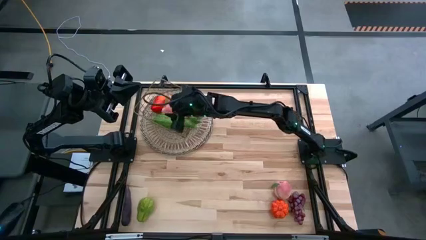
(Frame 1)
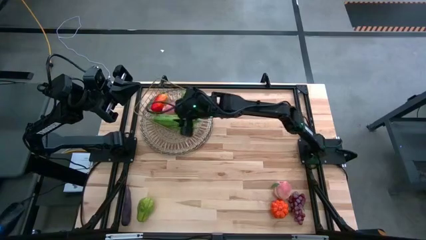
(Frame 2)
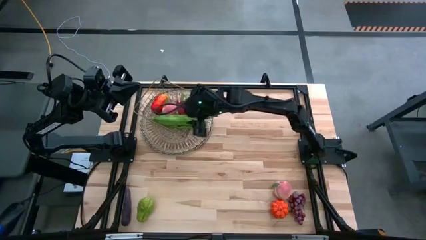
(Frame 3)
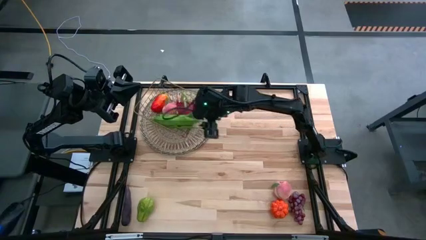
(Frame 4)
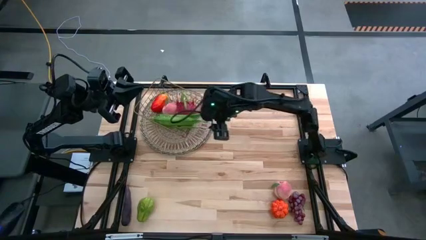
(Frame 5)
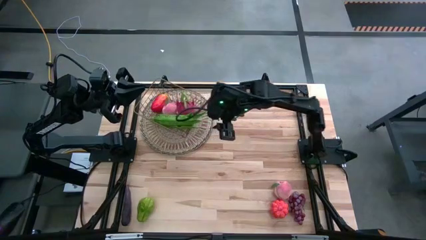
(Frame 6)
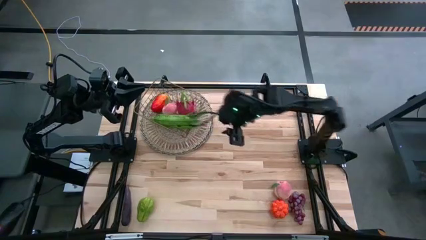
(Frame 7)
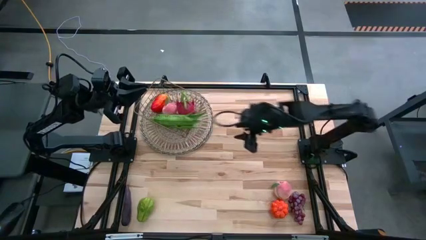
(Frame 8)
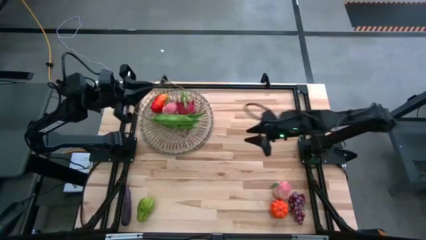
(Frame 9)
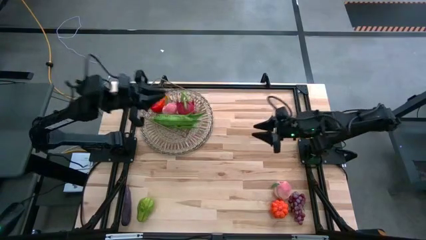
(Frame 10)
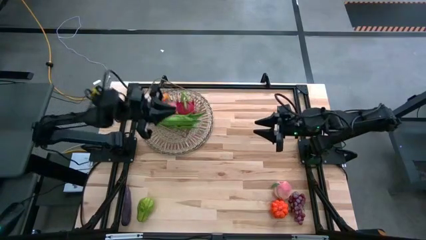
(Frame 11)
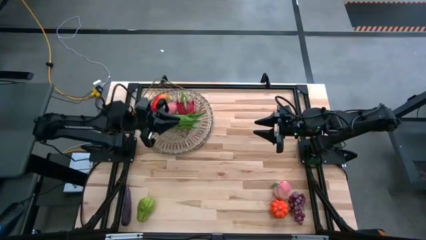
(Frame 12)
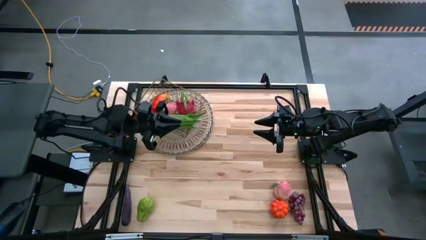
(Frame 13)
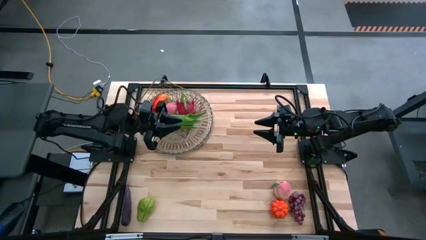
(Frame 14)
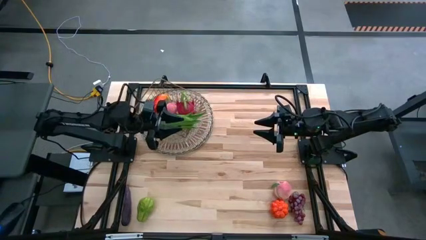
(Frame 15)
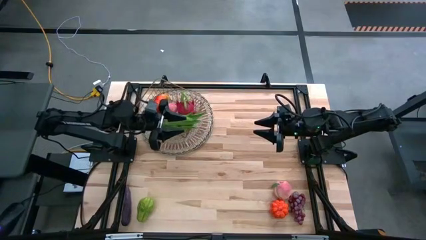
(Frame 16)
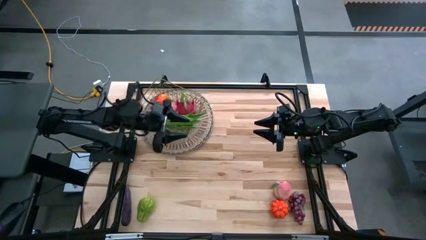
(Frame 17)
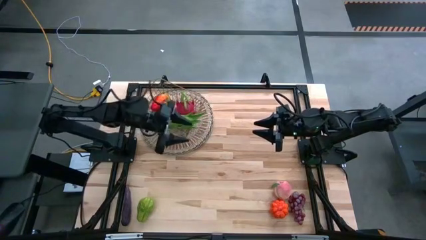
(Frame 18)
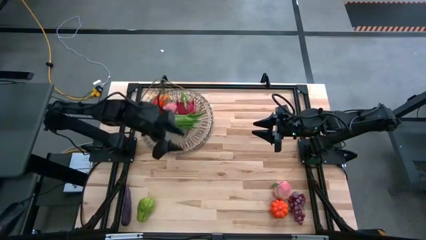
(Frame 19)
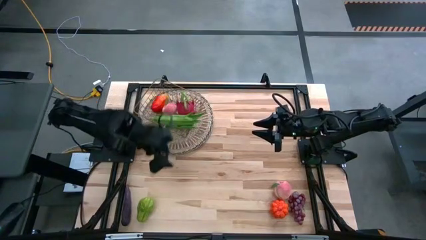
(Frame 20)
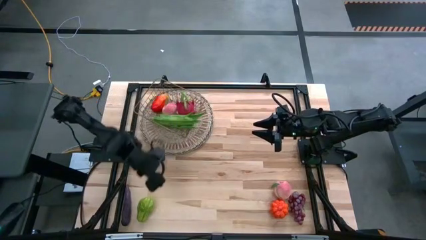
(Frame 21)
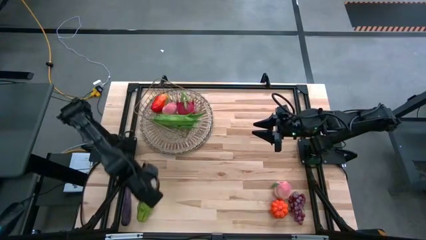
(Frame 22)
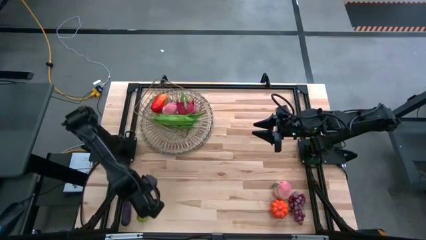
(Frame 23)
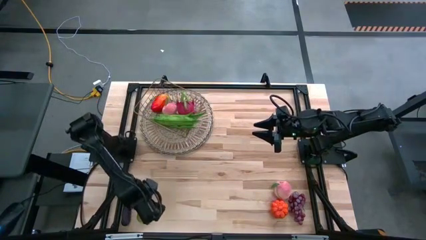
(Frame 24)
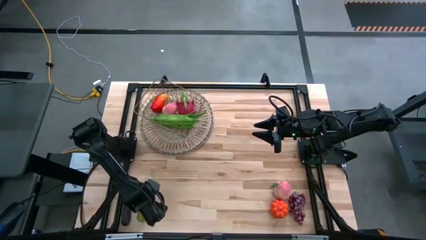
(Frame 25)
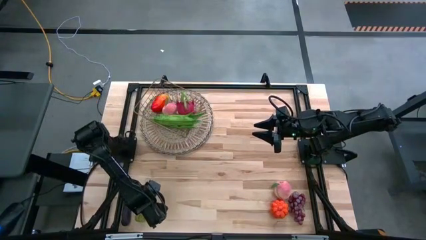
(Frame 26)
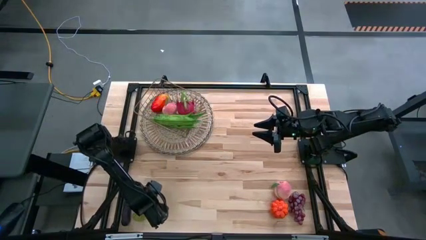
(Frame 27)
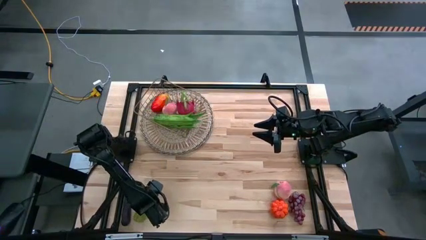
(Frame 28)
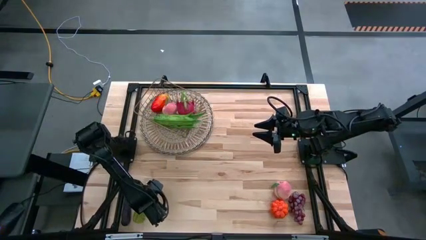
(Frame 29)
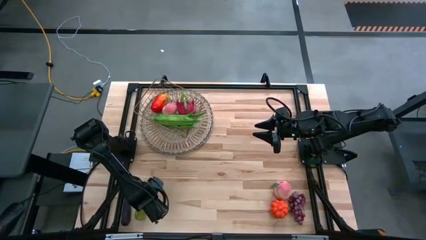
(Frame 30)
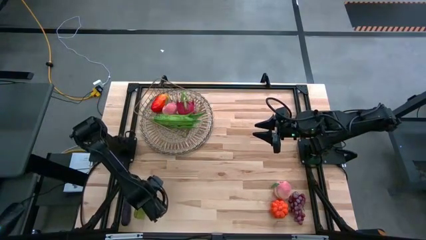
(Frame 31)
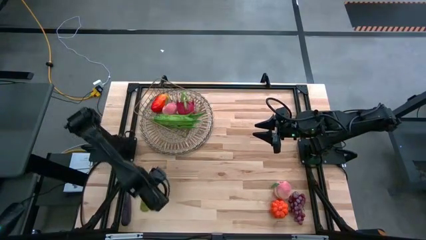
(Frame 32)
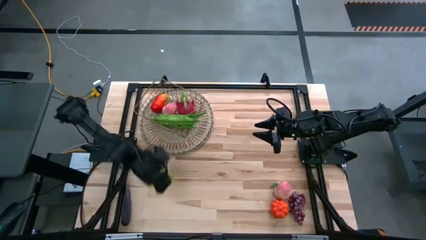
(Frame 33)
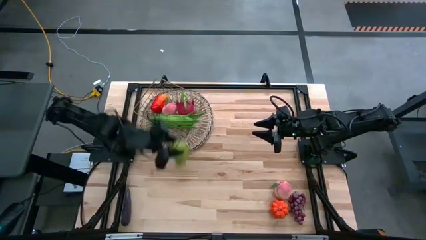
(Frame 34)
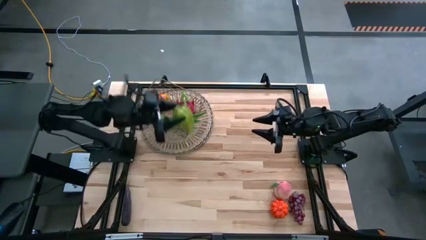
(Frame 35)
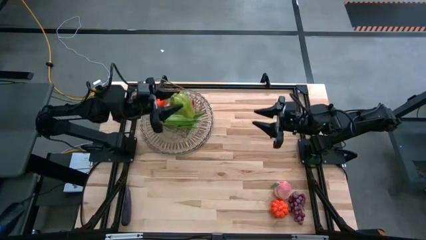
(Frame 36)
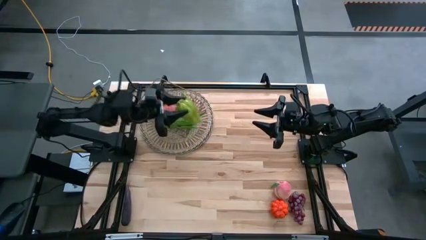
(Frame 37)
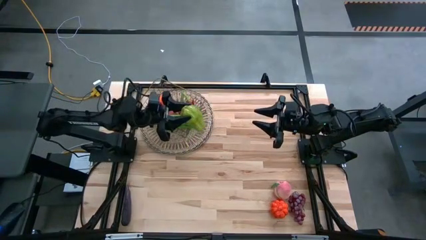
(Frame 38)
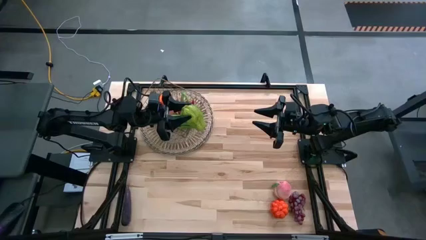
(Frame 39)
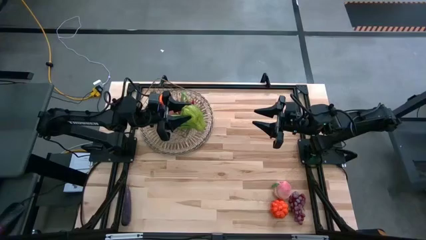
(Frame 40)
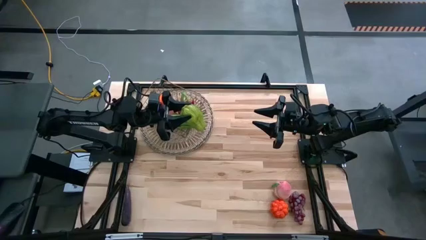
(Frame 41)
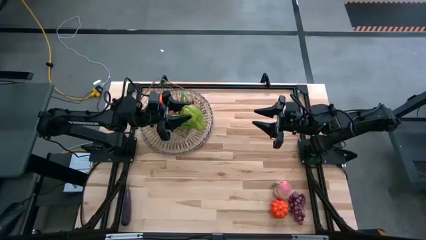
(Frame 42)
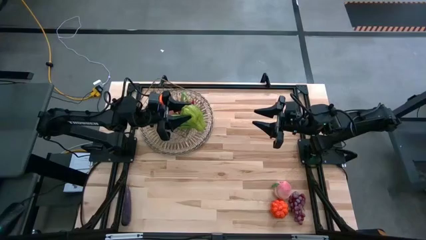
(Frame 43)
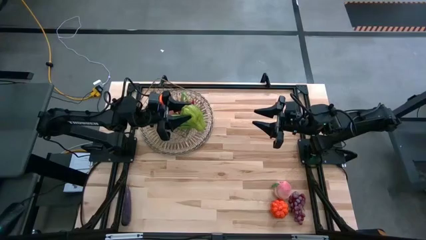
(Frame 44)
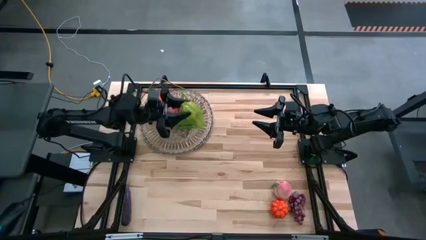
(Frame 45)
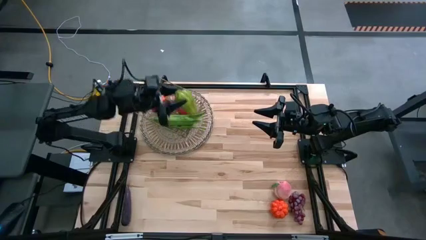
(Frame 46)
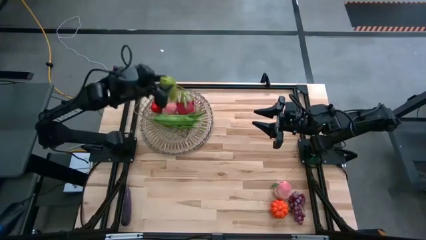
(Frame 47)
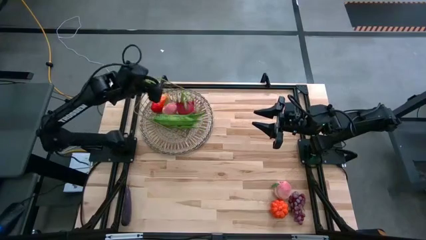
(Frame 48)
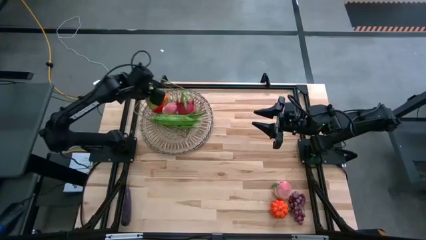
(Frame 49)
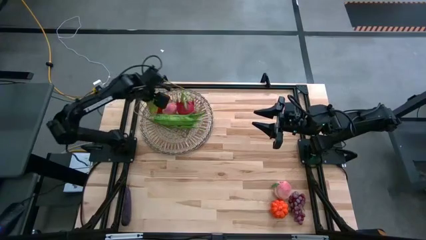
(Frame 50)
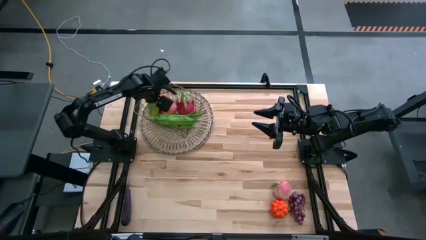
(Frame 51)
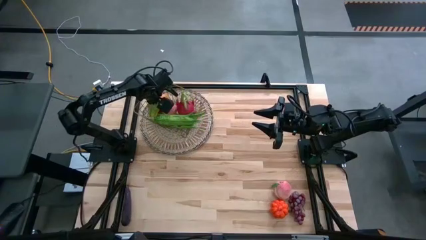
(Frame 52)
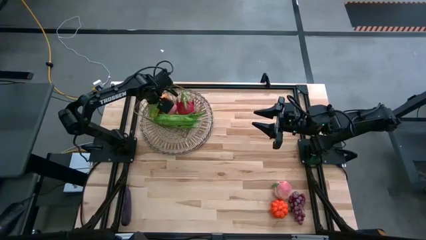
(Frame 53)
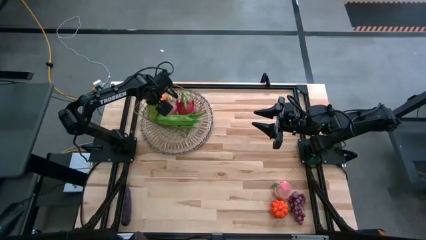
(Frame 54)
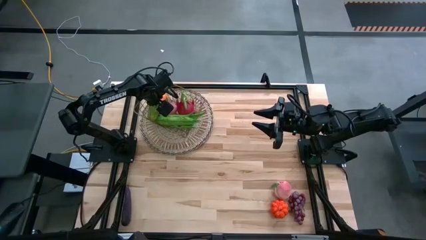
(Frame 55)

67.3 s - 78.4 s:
Task: Build produce basket
Put the chayote into the wire basket

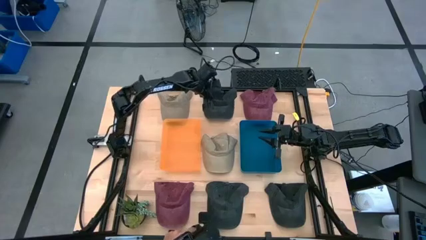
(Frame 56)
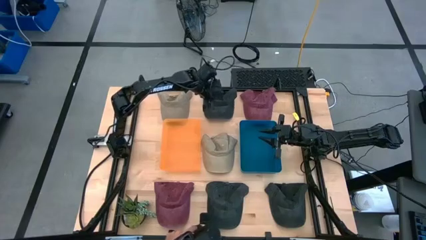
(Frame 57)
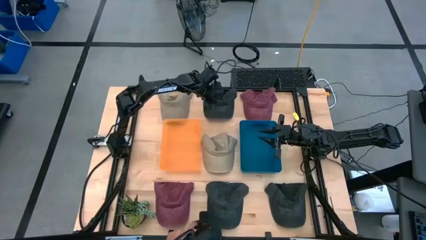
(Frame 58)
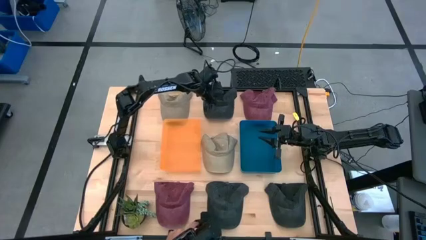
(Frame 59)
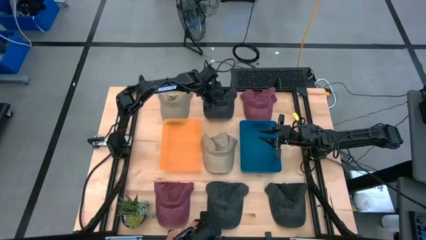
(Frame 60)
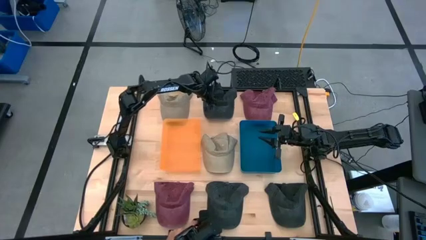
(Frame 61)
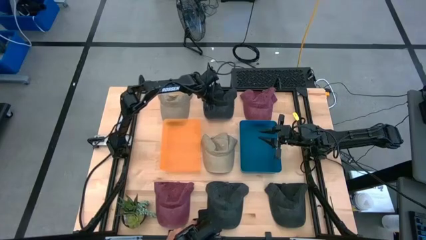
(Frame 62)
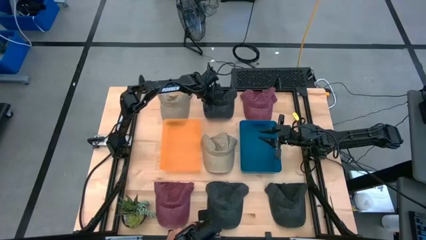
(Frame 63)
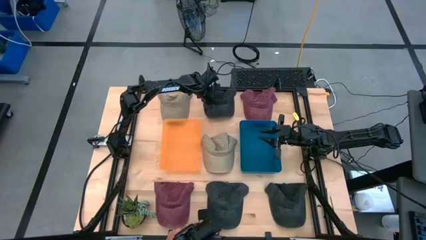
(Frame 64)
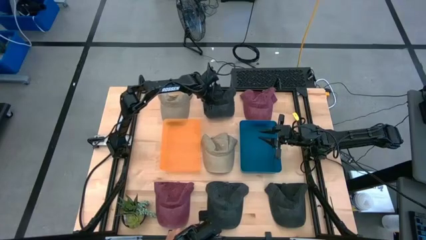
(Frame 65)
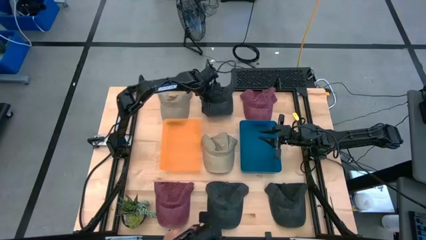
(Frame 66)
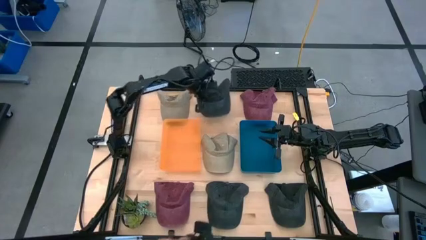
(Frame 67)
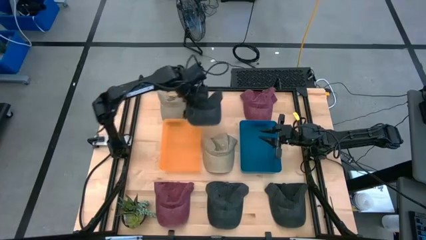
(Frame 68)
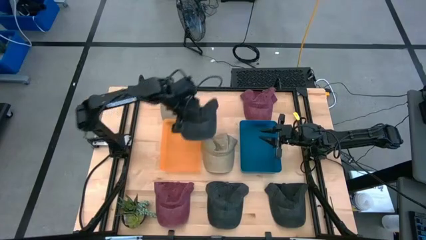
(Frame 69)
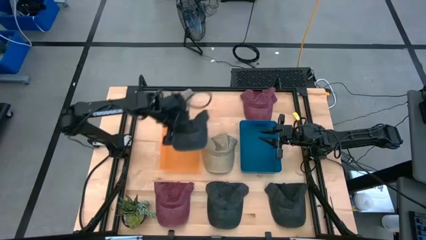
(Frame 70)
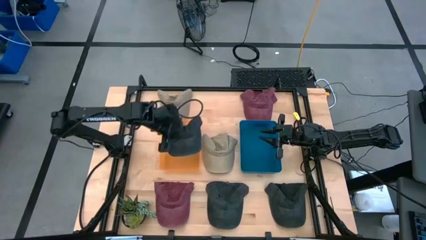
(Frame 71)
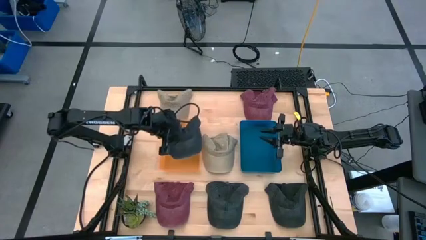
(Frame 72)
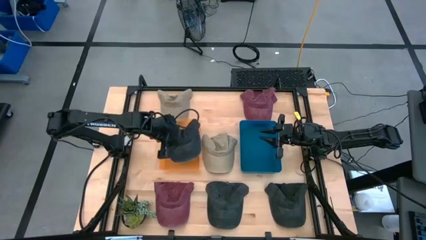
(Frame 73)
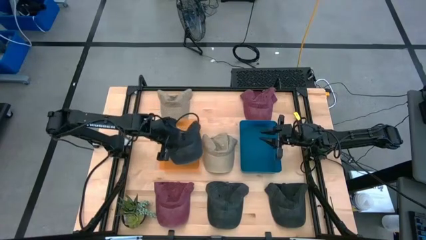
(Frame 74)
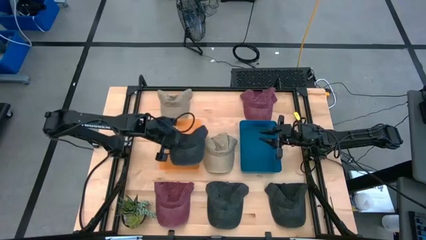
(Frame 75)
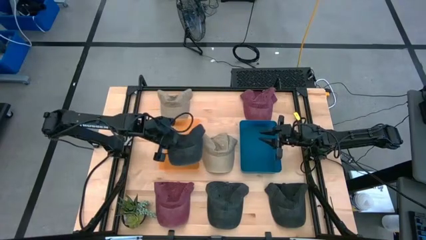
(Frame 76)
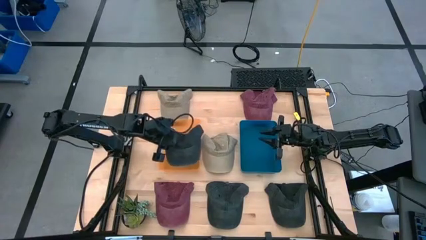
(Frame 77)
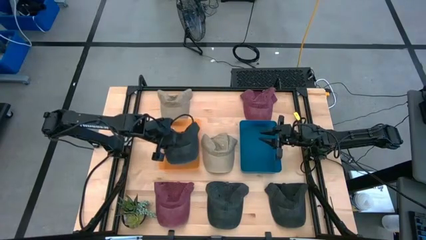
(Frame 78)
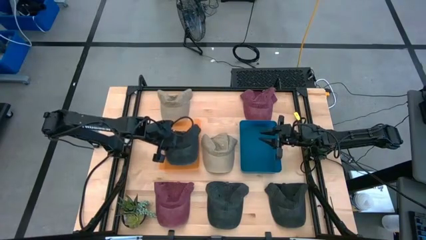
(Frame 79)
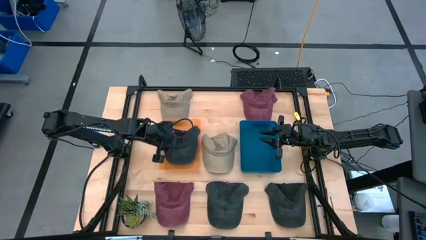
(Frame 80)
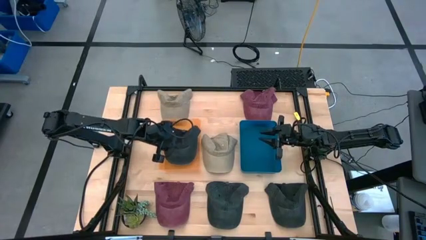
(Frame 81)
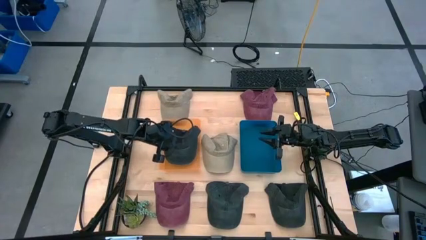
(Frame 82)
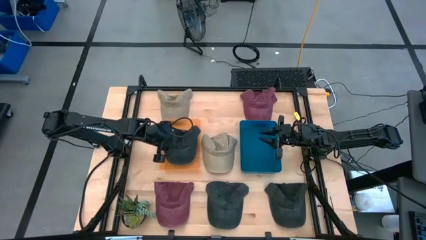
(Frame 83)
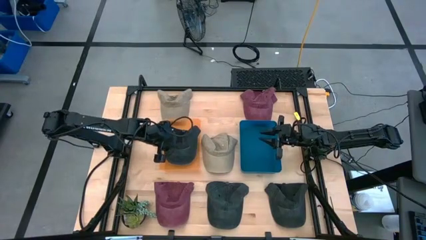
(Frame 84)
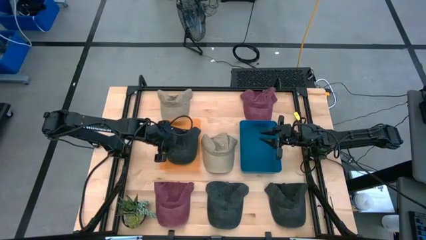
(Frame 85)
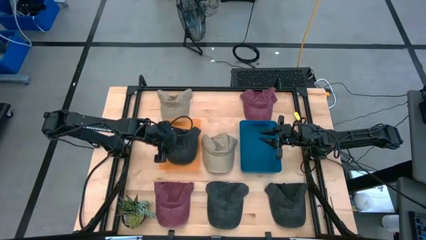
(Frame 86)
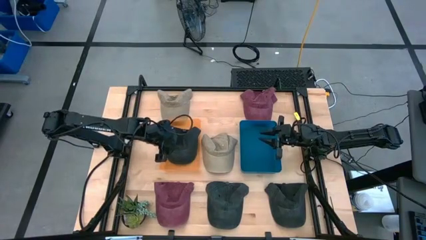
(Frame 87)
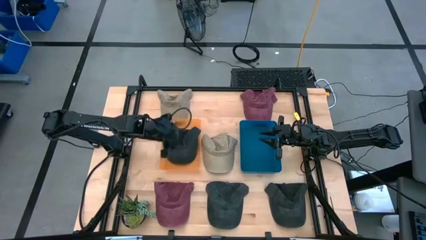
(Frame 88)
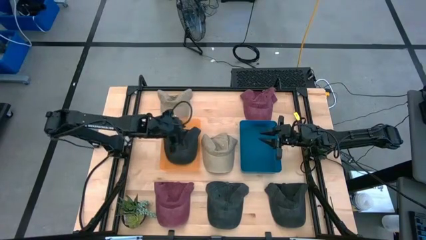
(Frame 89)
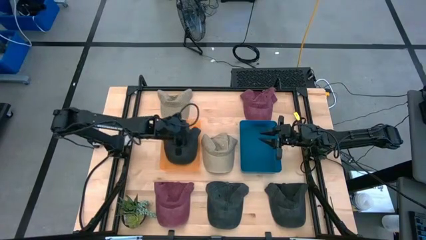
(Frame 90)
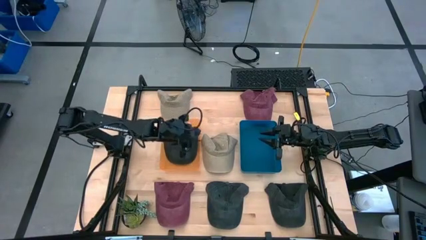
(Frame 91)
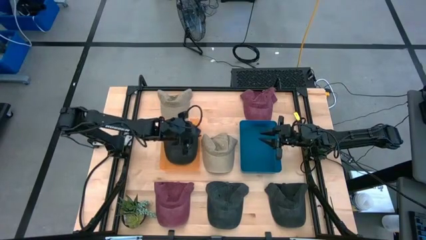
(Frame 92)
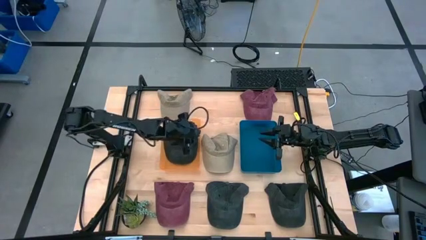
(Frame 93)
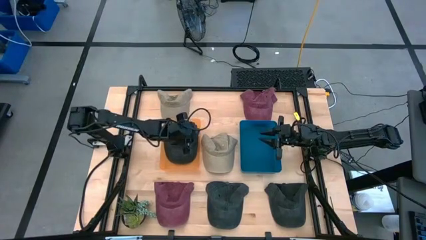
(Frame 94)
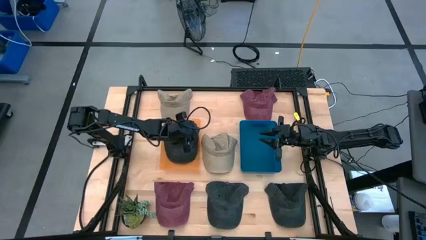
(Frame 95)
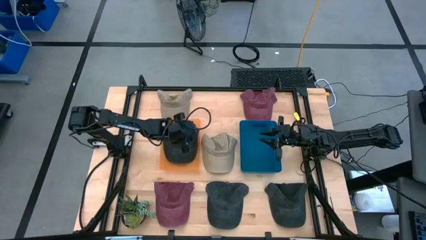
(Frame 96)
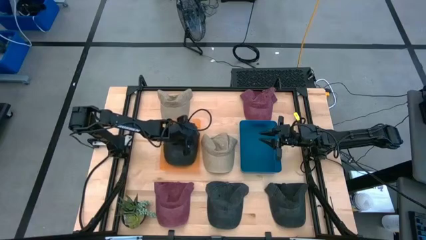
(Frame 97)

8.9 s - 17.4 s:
Task: Pick & Place hat
Put the top black cap into the orange bin
